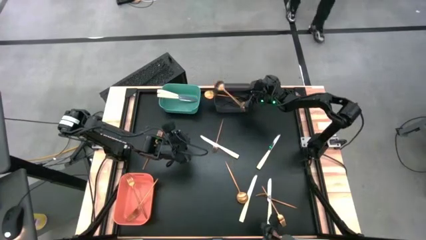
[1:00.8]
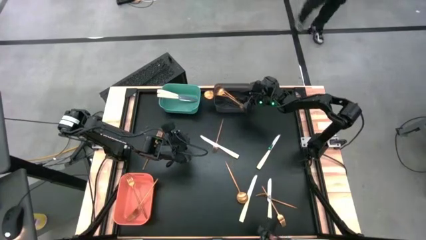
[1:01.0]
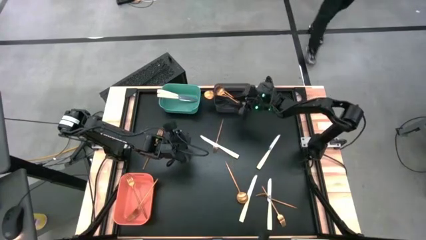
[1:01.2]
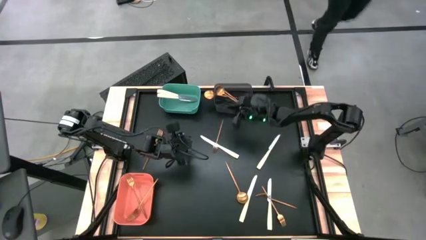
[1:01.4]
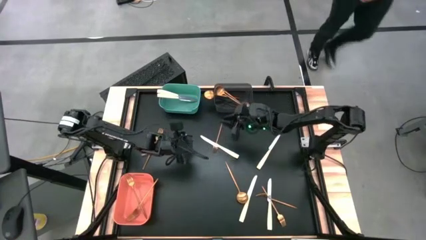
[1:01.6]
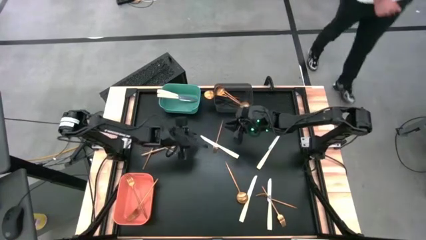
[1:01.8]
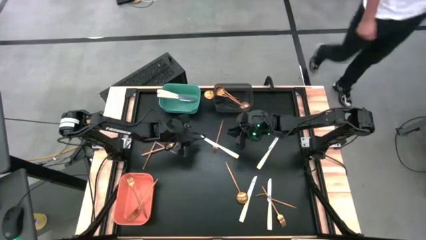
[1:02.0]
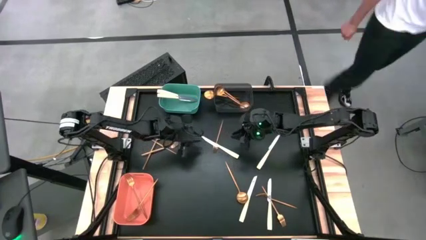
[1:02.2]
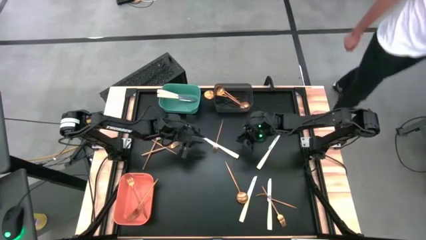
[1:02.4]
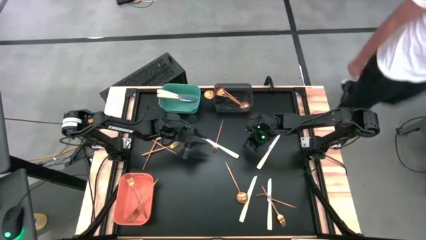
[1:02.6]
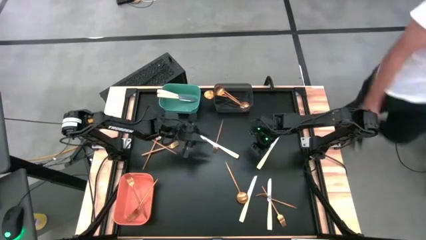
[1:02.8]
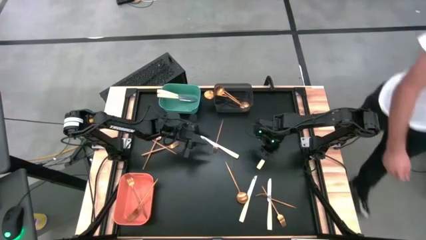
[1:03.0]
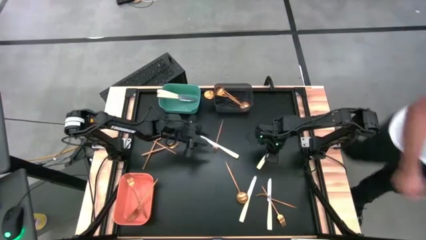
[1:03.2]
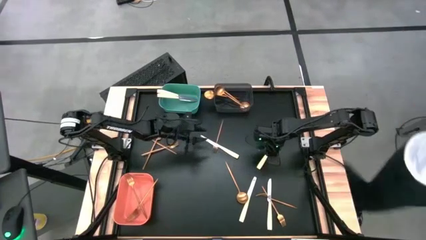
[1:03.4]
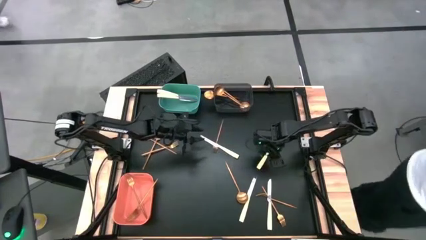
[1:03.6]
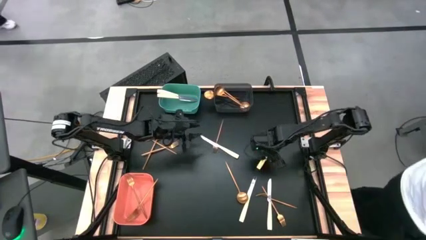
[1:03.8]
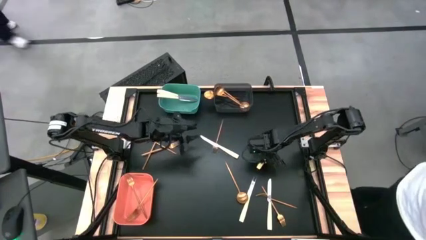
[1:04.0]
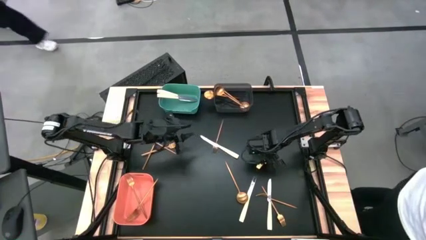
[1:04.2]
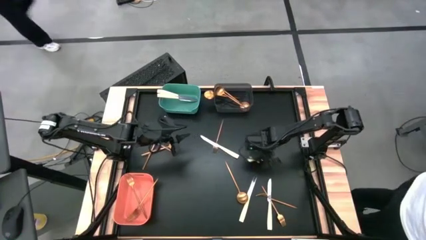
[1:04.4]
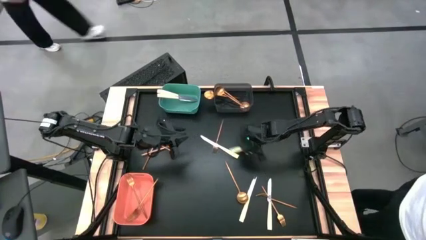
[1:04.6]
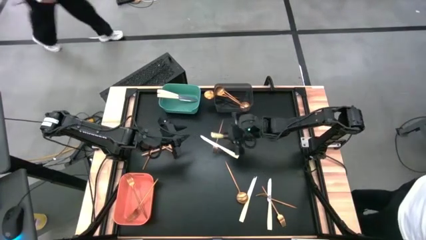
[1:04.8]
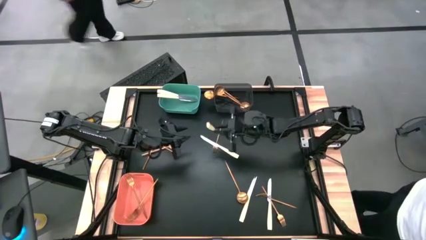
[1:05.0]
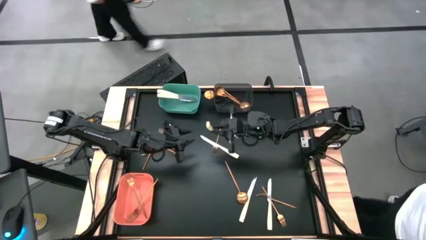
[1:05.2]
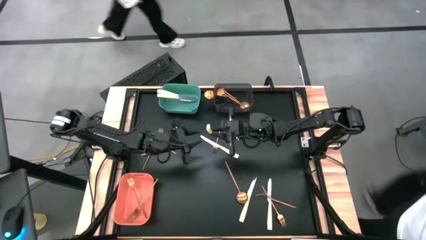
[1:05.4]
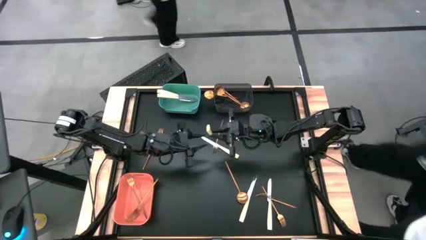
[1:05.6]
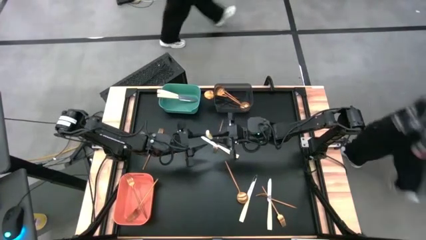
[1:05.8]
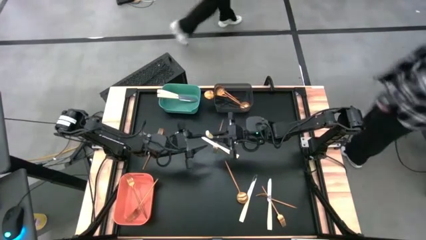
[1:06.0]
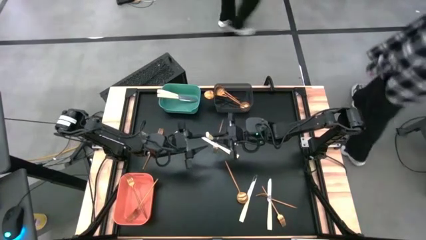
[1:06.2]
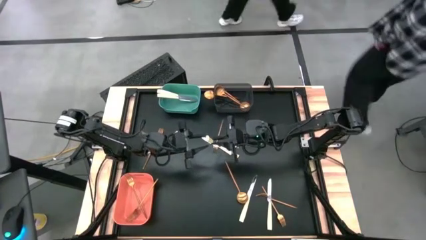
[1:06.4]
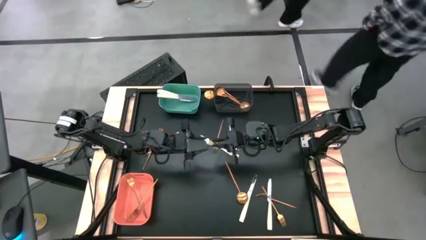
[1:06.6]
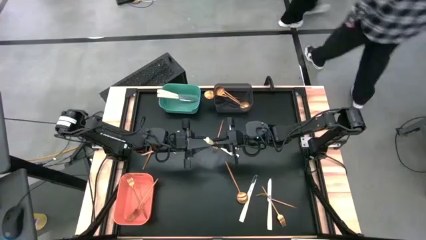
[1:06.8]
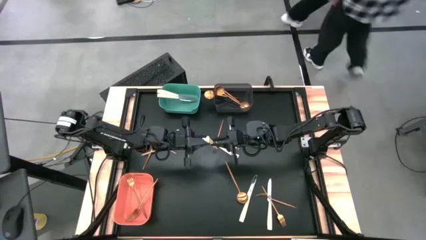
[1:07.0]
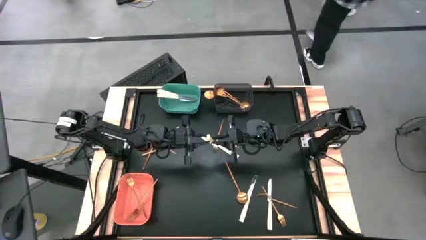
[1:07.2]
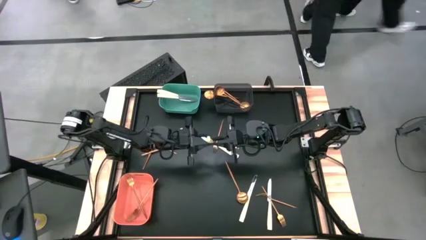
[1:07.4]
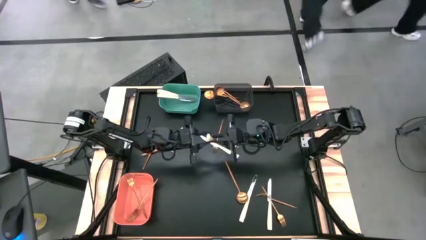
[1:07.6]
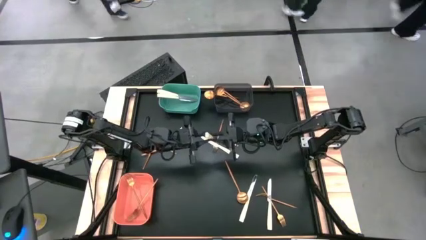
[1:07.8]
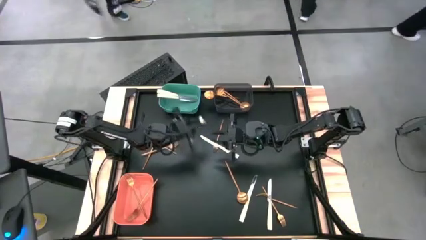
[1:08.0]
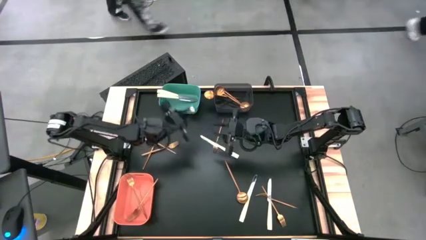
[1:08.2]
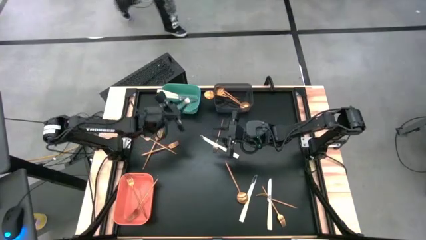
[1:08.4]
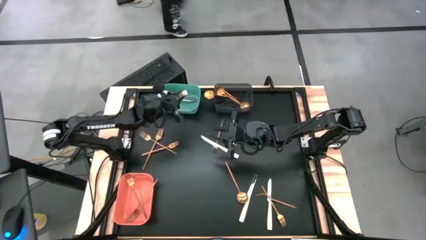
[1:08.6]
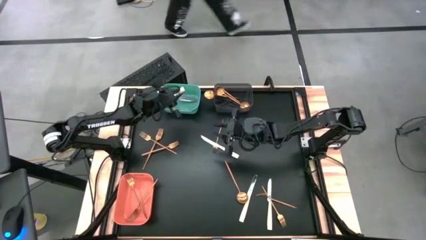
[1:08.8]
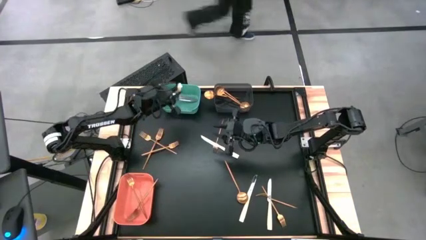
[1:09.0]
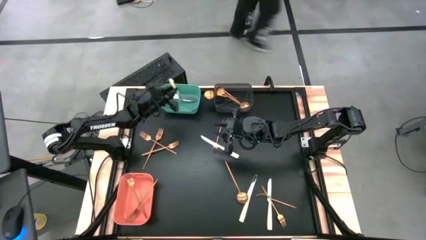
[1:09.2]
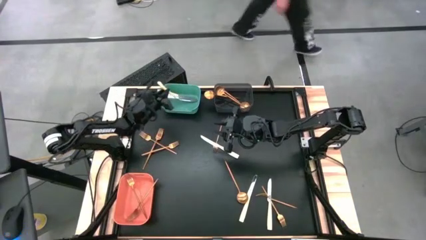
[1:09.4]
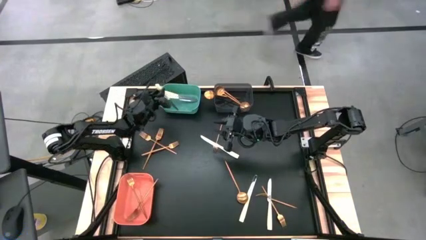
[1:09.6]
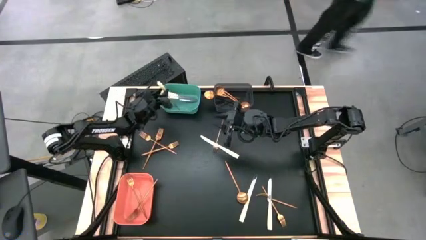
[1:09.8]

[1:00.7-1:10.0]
Task: Sort silverware by color (type)
Put the silver knife into the light blue bin

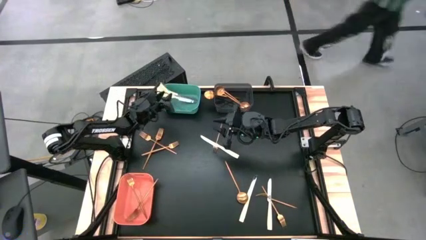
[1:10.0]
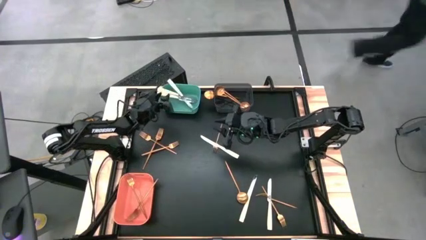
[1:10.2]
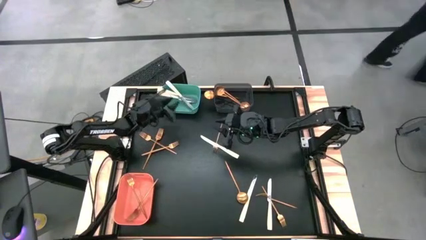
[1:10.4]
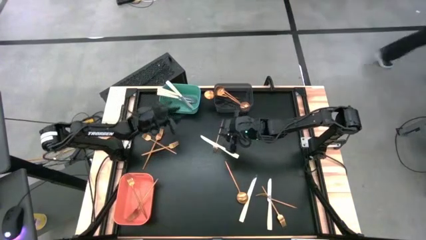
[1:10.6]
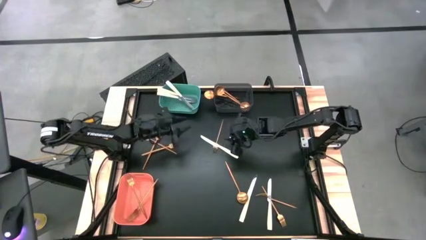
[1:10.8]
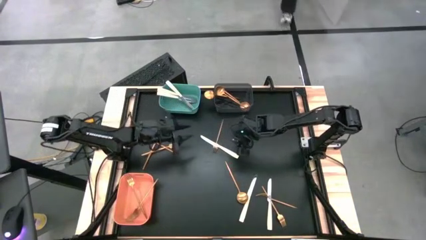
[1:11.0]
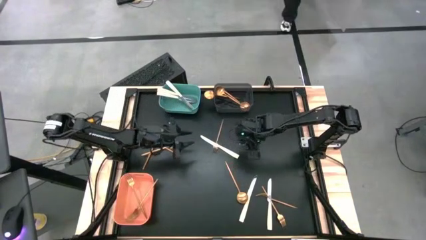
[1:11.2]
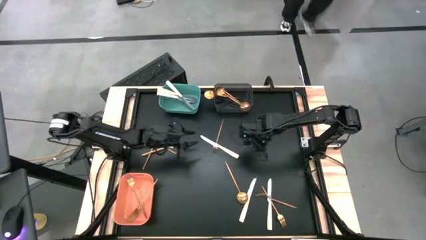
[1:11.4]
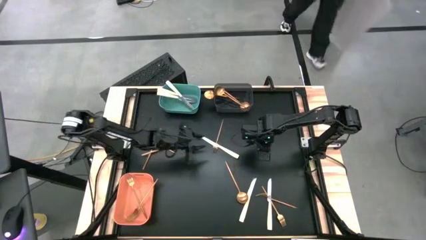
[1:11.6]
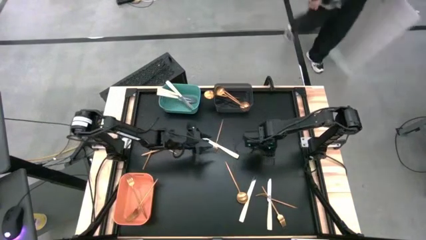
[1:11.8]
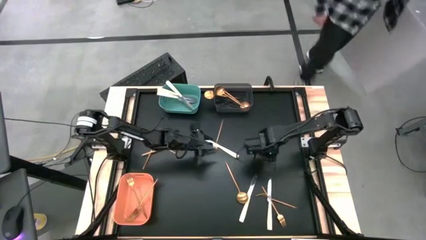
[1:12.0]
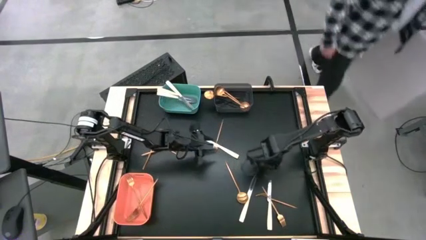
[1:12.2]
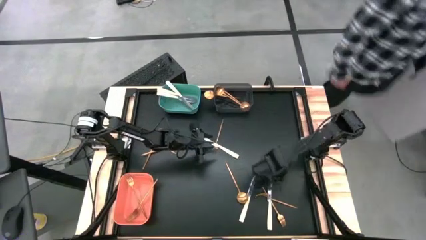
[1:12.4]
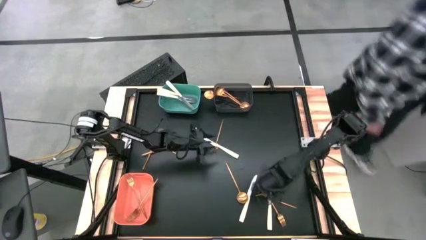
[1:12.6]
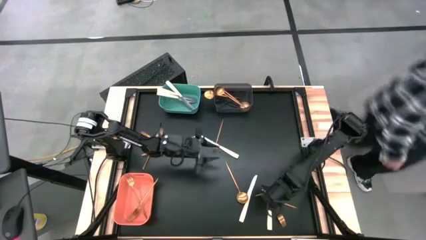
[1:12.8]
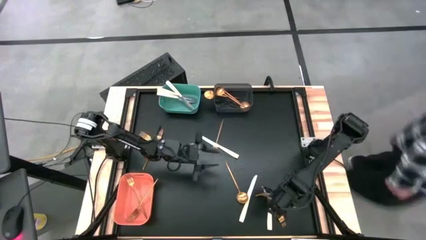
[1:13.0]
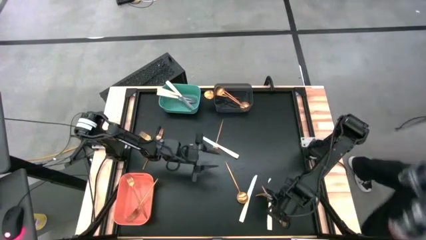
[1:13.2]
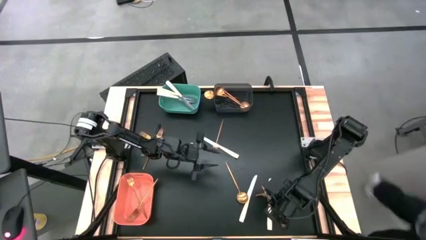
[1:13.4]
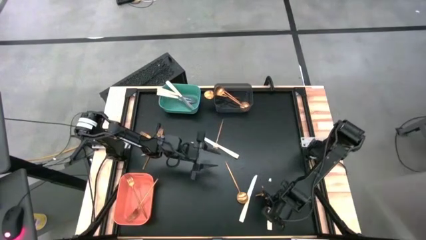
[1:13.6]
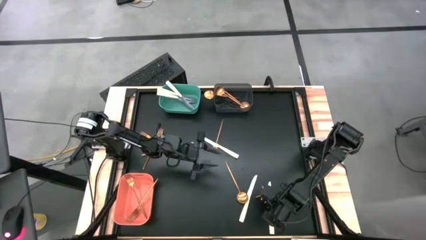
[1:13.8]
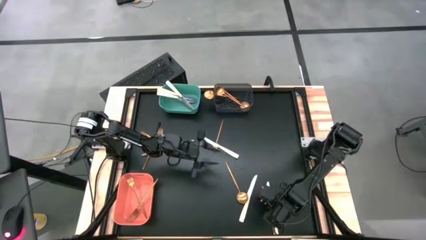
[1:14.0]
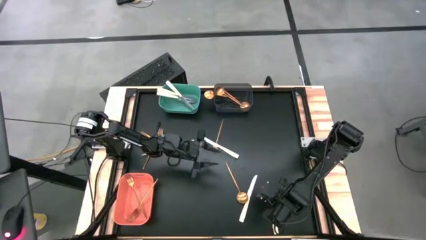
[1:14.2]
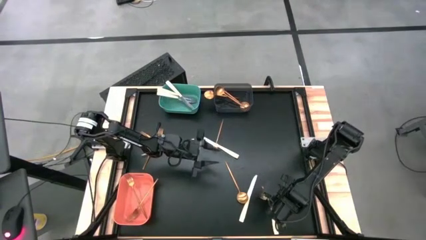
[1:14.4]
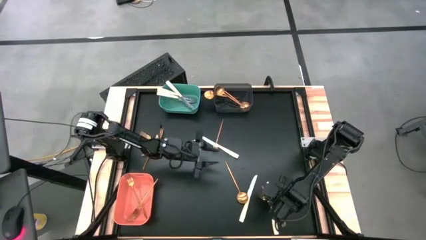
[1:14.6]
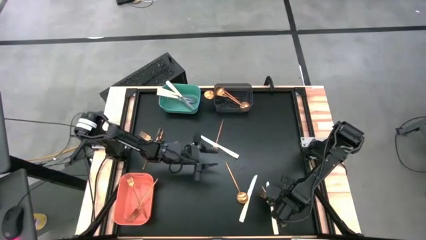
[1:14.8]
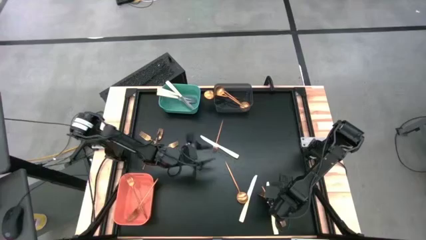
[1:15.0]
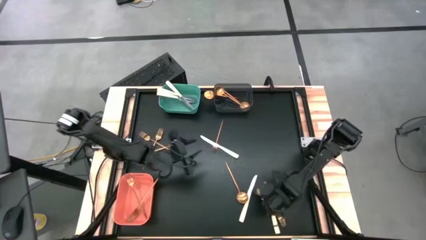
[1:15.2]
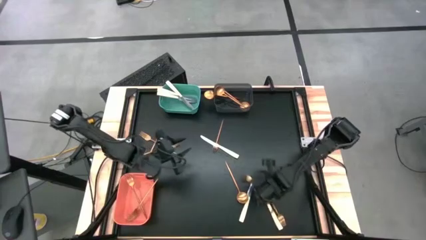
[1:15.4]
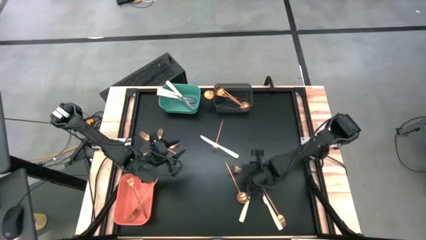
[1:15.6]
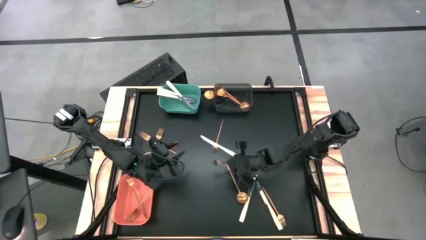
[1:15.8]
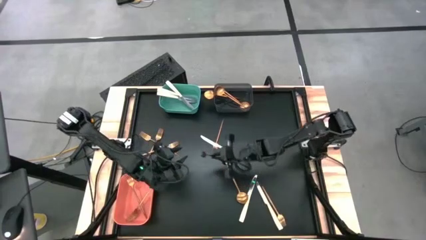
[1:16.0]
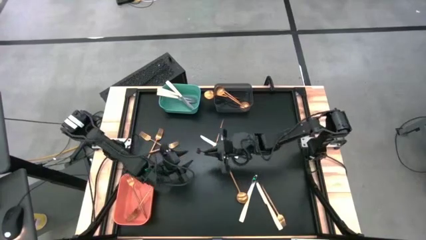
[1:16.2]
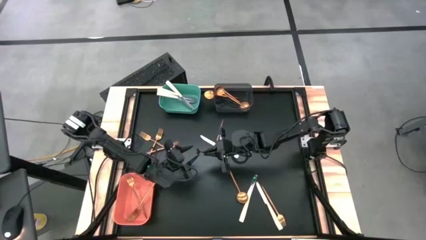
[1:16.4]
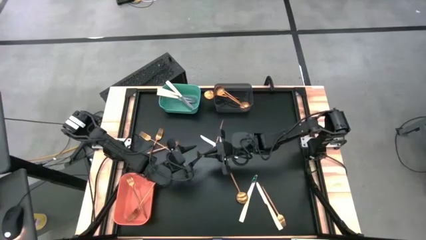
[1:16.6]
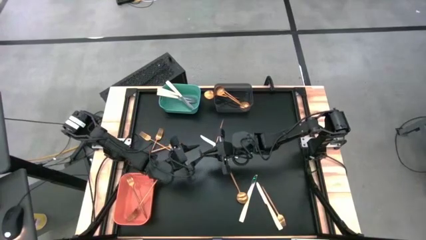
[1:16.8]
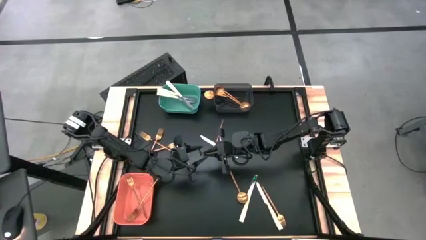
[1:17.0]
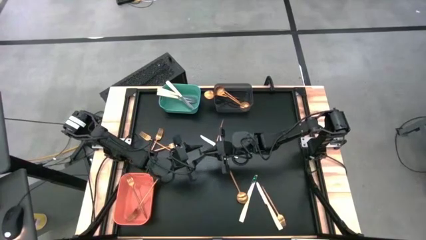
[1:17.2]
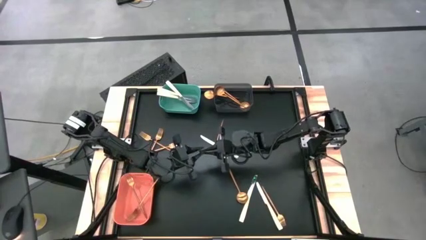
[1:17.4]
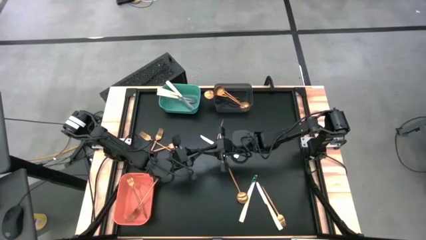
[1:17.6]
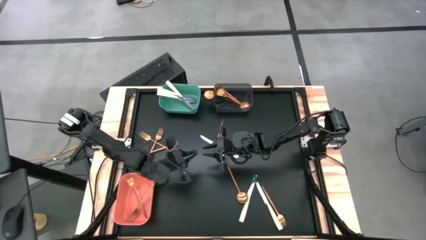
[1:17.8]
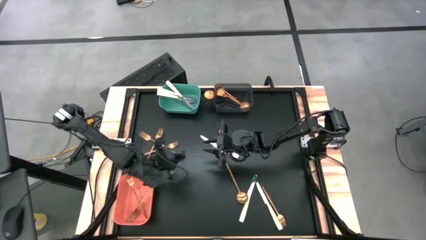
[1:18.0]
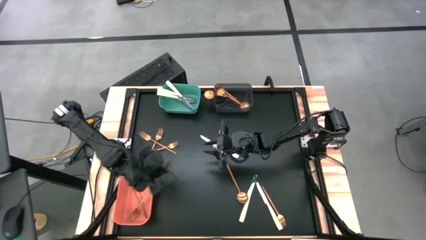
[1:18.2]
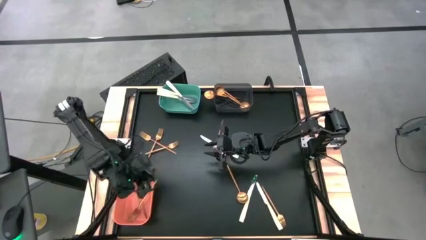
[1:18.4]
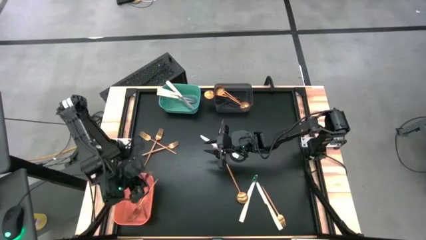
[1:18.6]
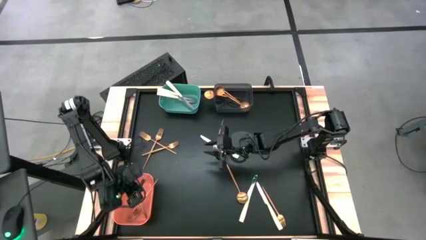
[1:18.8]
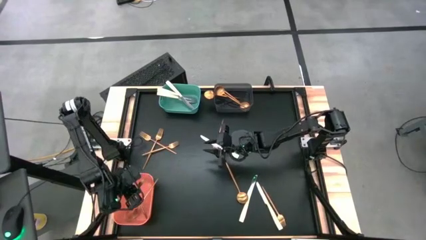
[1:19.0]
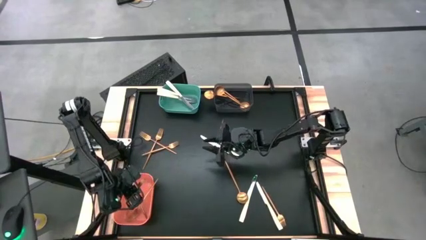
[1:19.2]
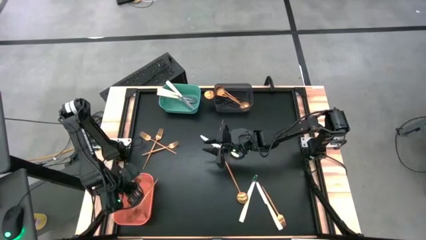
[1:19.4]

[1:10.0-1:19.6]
Put the gold fork into the orange bin
